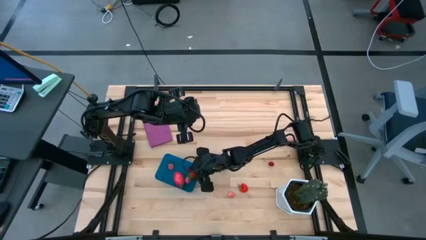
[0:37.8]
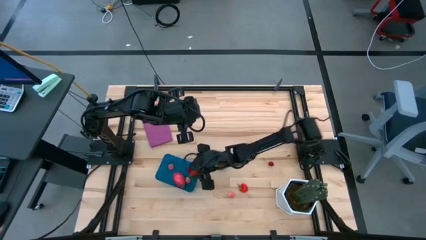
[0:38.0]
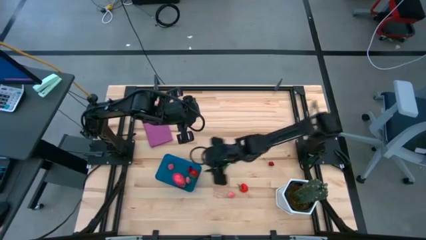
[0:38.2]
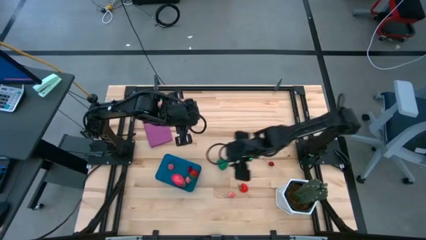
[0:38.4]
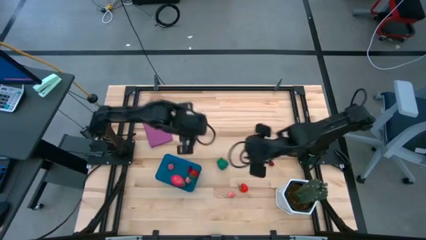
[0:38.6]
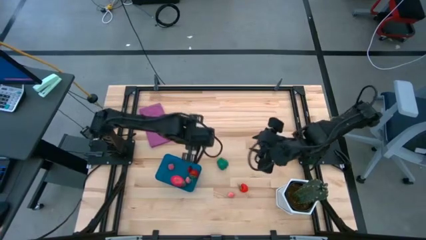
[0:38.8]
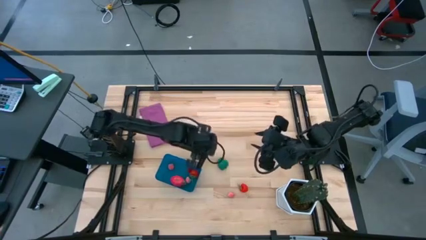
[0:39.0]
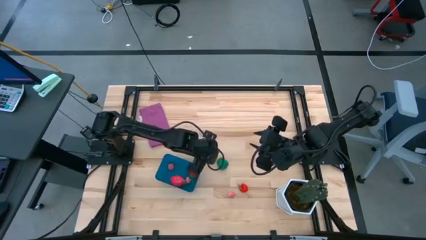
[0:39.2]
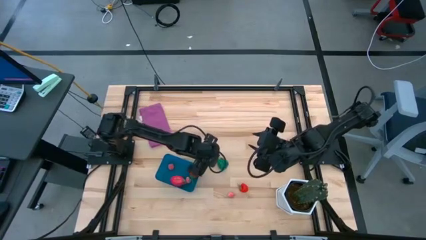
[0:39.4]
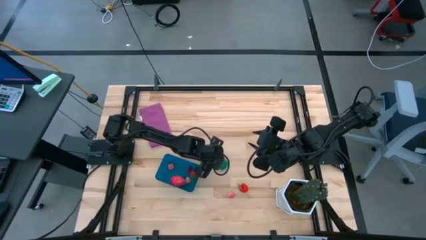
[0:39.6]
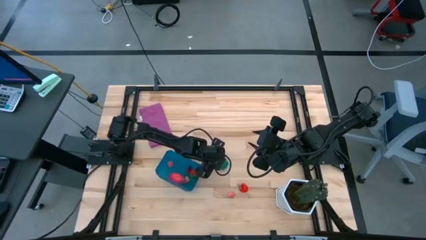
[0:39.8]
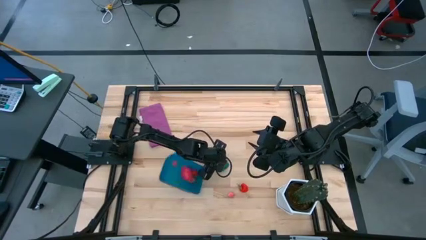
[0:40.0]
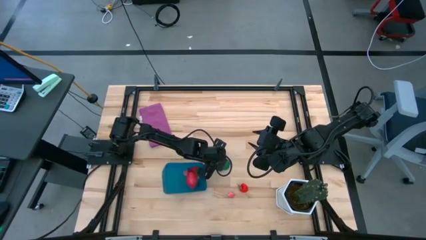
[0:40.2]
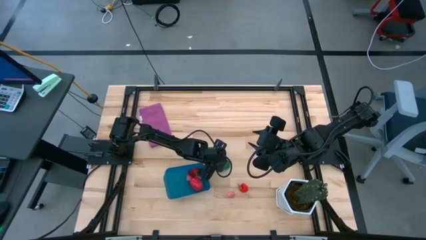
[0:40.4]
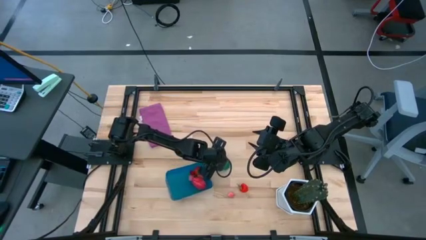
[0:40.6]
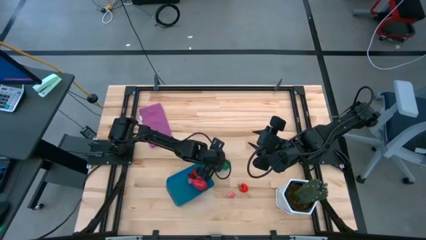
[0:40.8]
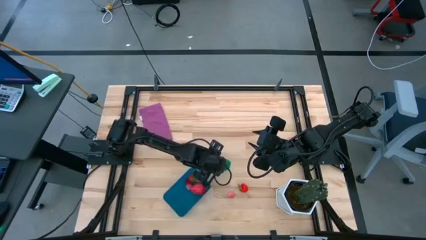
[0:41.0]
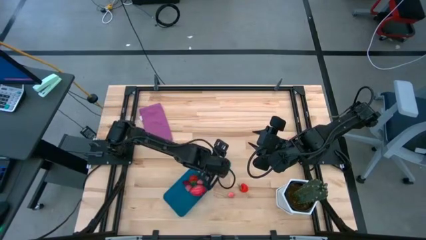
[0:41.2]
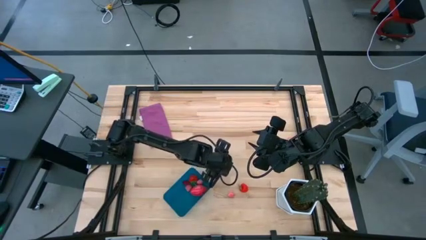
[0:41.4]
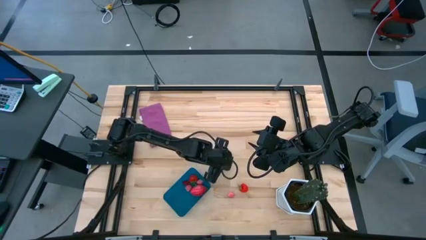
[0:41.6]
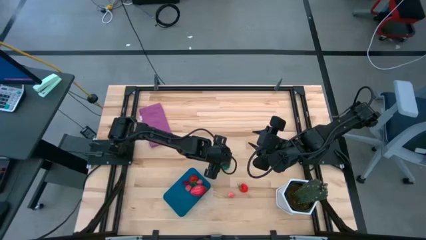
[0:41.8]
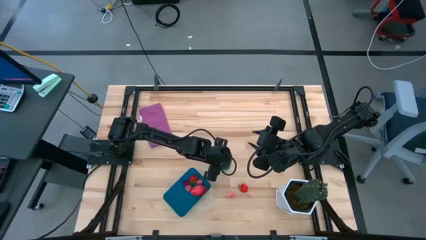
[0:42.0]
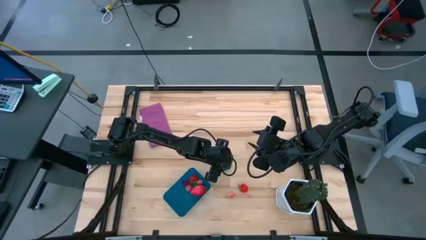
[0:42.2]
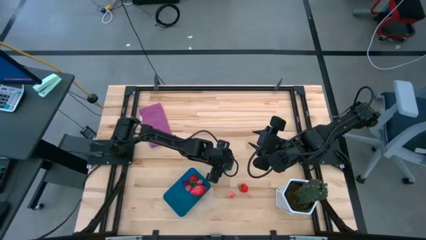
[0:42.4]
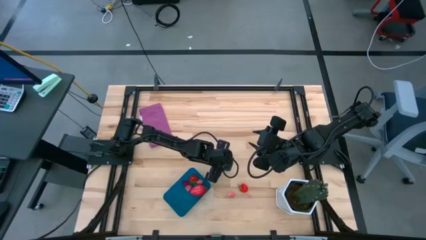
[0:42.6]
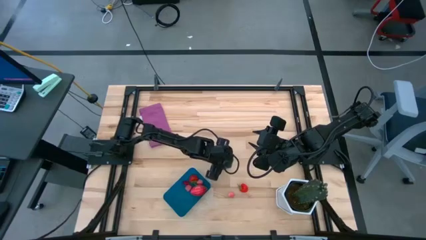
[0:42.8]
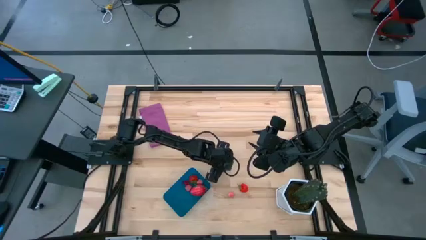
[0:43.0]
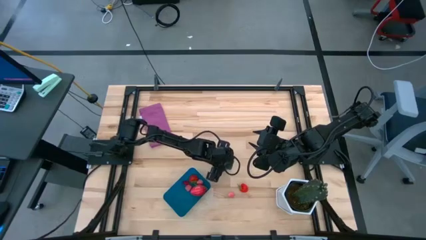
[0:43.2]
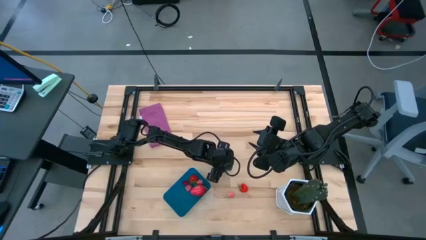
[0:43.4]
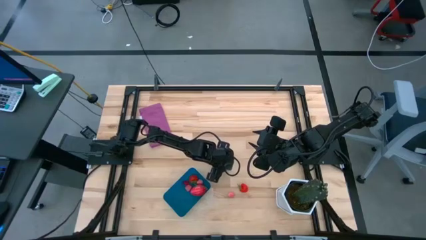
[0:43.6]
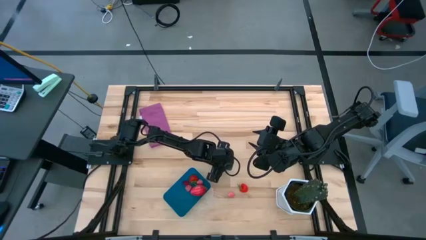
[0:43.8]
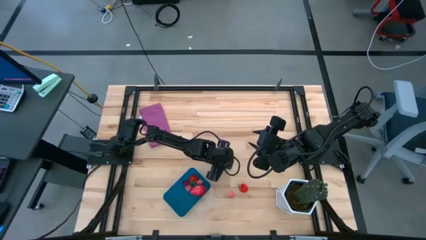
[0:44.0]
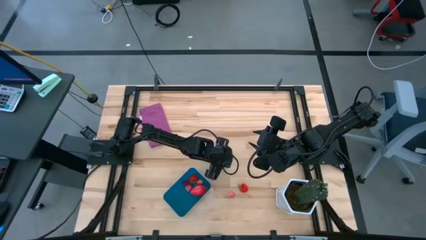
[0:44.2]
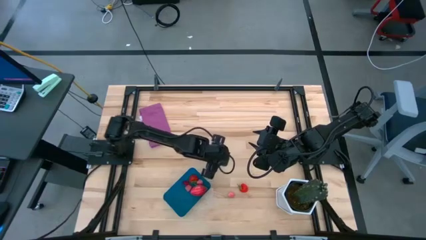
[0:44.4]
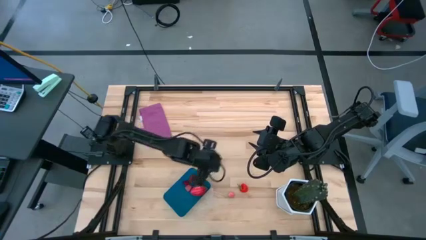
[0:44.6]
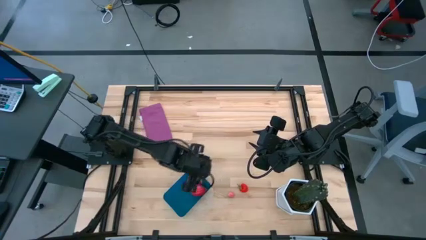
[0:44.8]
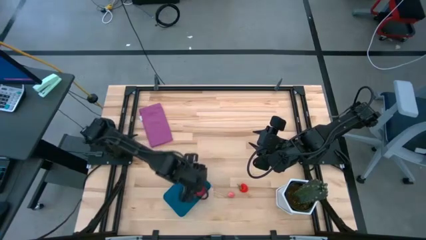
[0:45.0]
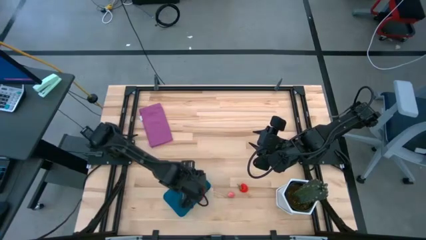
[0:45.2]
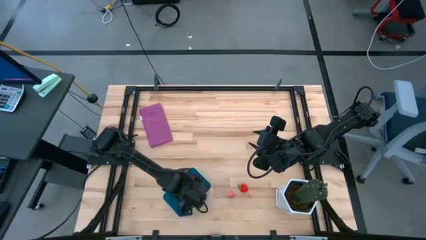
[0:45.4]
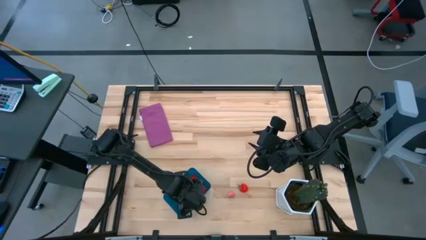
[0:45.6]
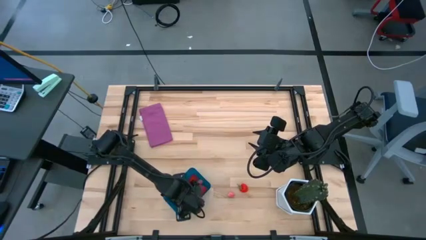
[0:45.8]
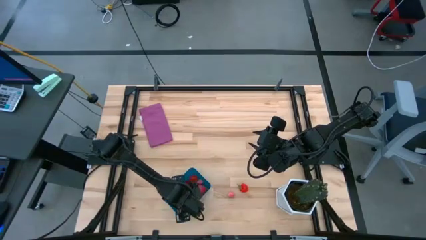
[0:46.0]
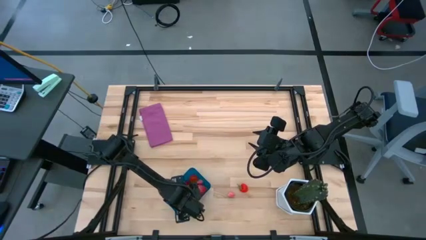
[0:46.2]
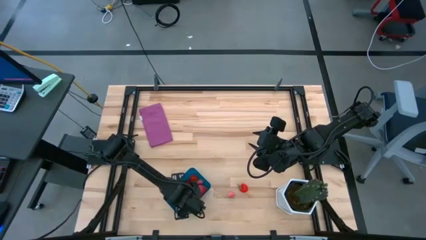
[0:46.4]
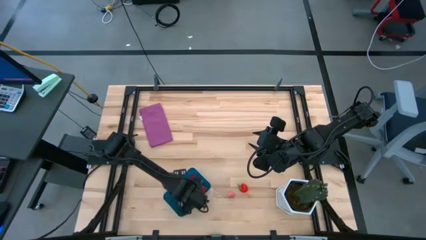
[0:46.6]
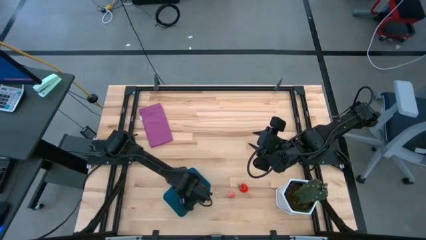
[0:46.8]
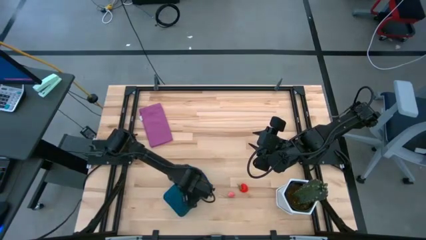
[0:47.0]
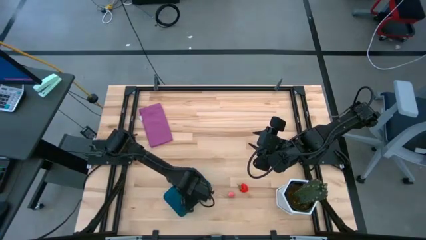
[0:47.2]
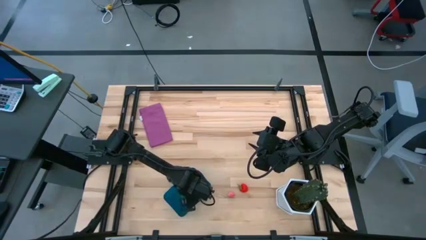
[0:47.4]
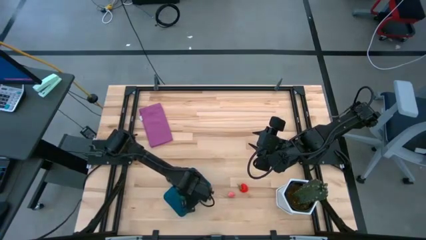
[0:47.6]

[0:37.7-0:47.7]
Task: Pick and placing Produce into tupperware
Put the bell pepper into the blue bin

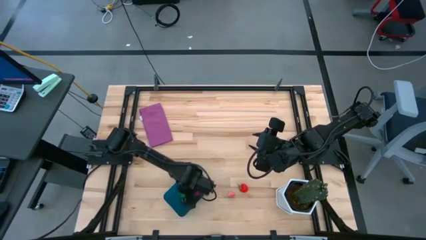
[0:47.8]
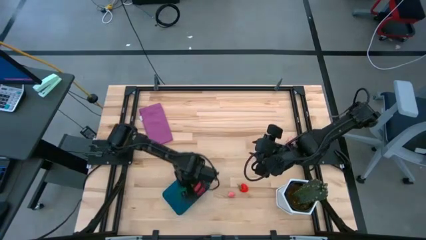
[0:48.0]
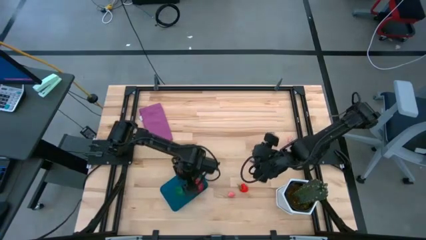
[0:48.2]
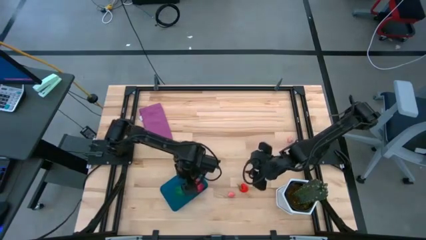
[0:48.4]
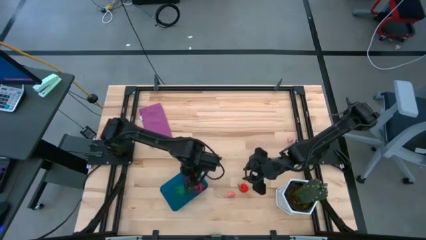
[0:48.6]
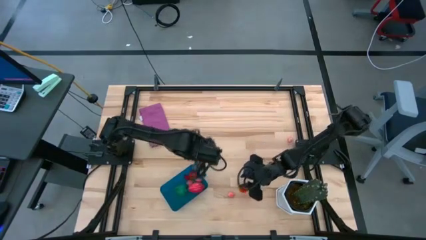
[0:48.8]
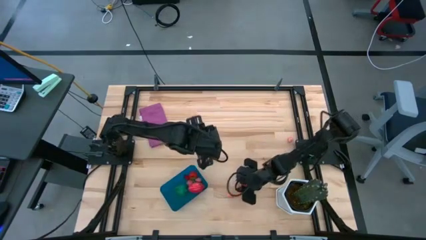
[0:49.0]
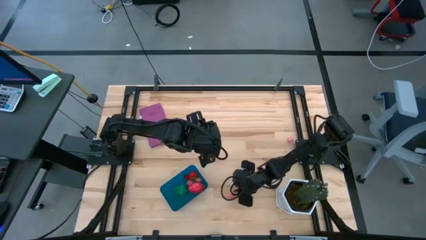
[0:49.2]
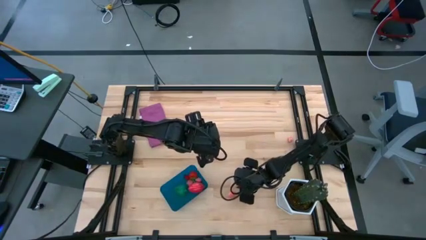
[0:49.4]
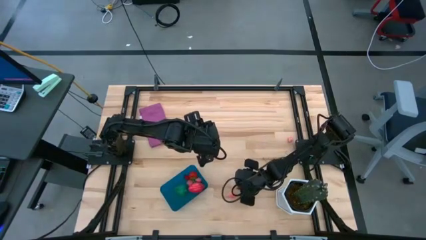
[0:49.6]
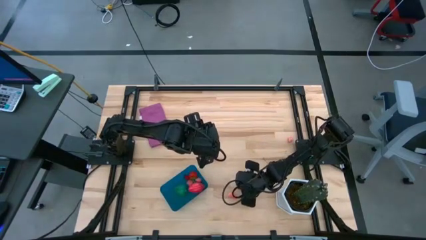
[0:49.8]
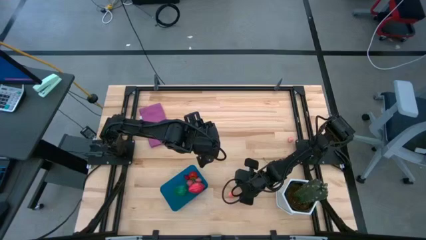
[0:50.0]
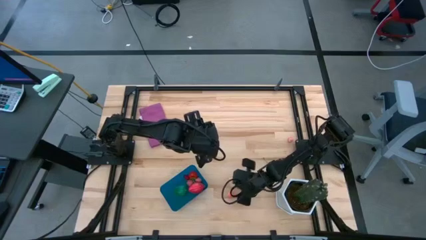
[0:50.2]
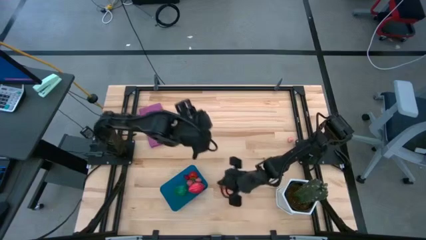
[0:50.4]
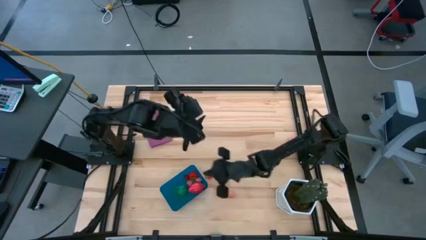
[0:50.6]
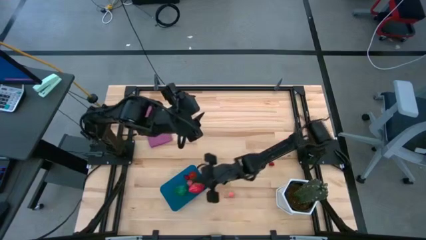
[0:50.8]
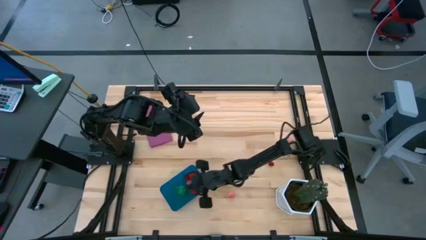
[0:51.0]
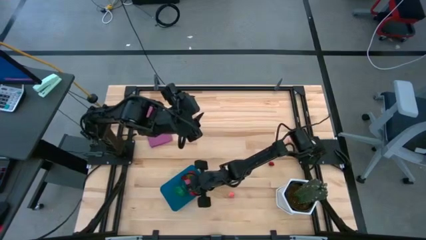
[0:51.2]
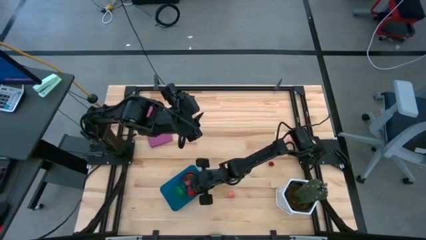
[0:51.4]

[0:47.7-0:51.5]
Put the strawberry into the blue bin

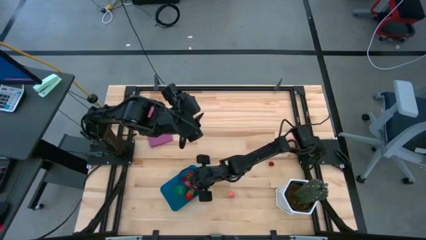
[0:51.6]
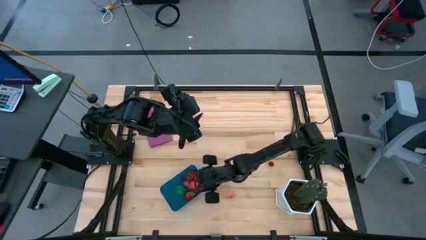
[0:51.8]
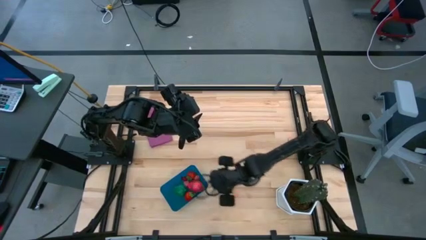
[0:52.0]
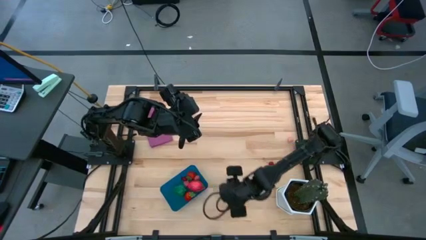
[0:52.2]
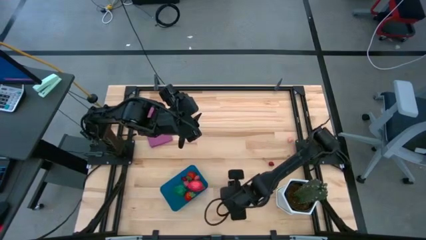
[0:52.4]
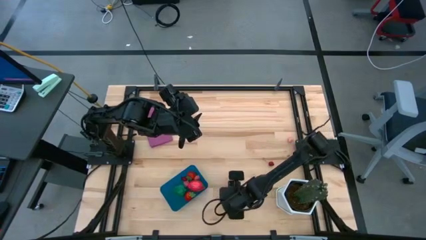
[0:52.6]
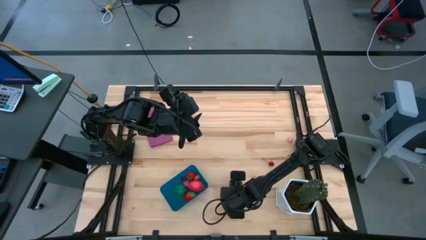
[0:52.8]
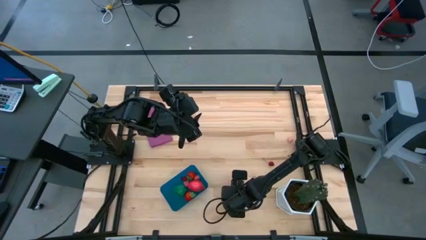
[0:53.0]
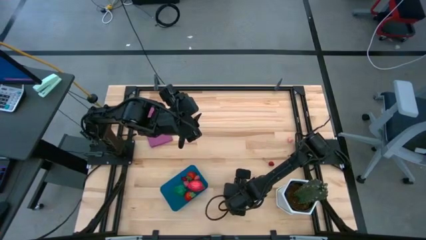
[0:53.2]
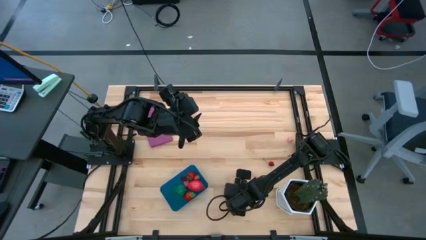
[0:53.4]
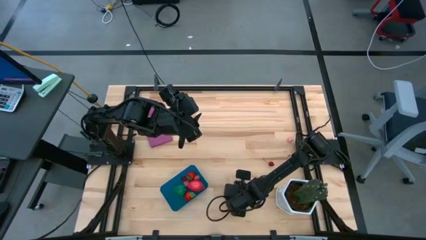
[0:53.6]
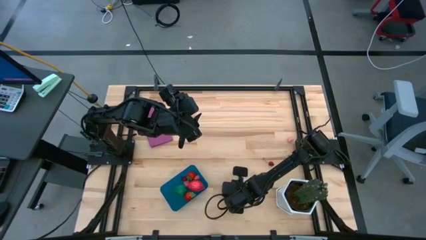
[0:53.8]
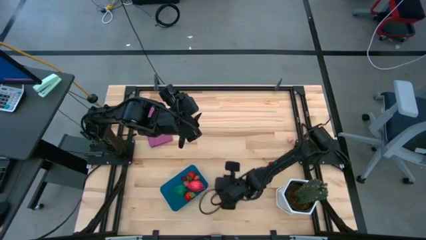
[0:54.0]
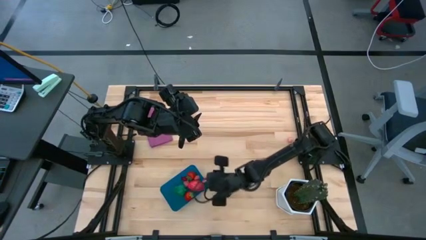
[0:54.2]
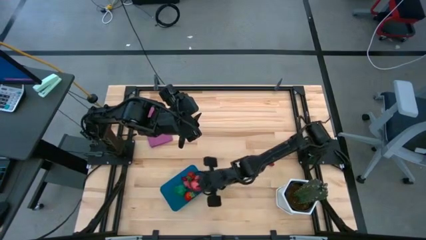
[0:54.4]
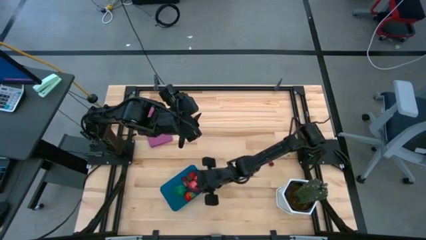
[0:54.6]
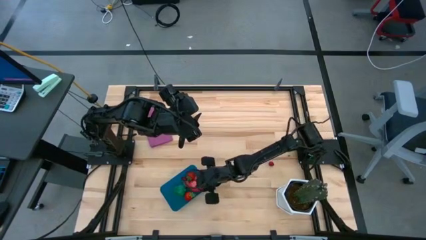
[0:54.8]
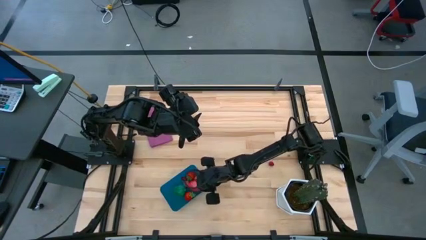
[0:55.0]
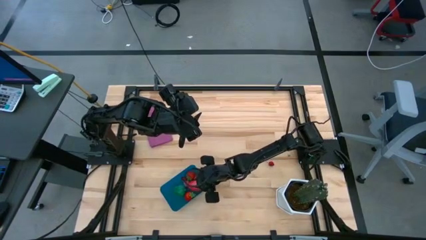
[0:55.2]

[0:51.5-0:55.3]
Put the peach into the blue bin
